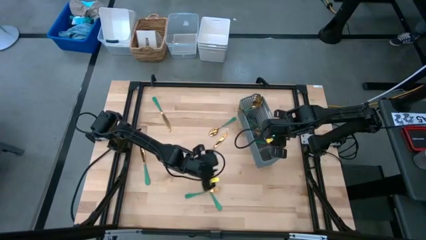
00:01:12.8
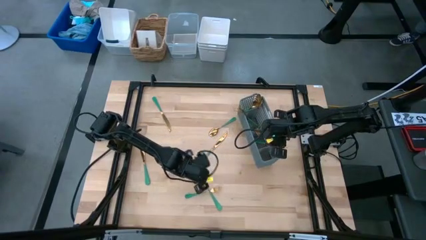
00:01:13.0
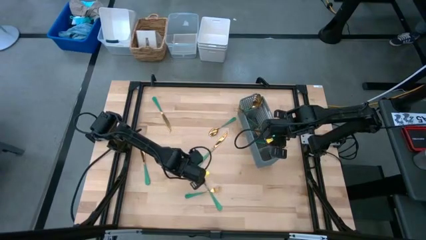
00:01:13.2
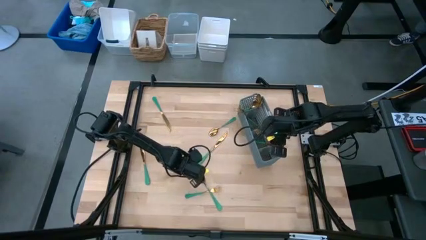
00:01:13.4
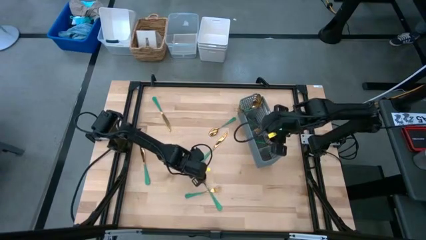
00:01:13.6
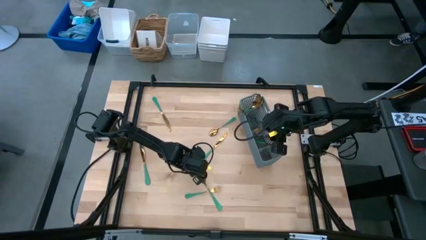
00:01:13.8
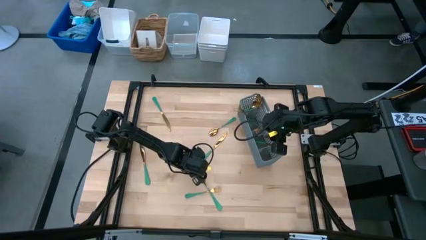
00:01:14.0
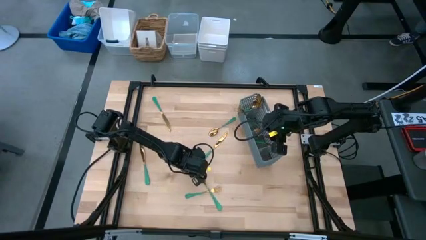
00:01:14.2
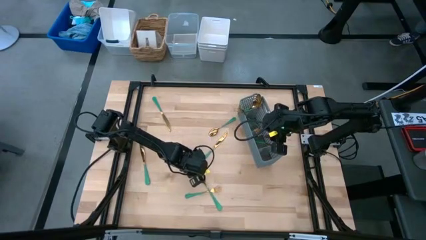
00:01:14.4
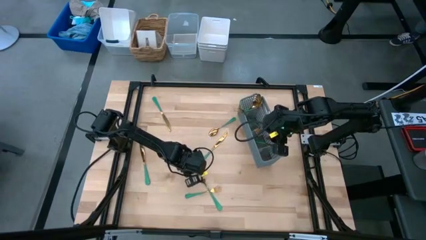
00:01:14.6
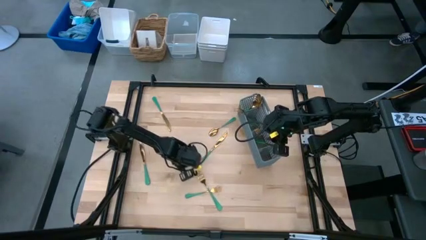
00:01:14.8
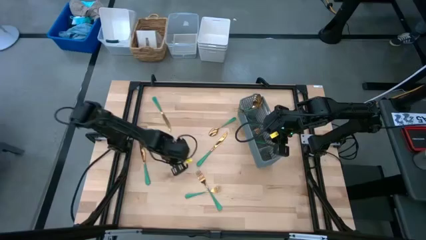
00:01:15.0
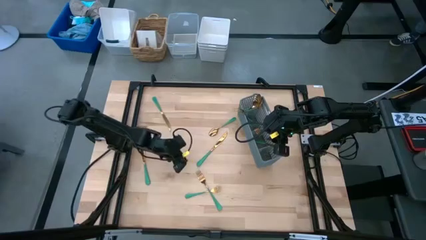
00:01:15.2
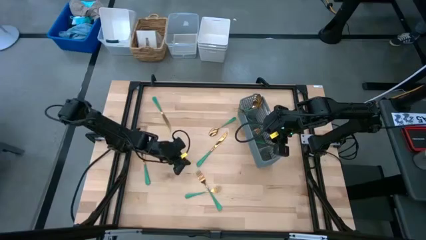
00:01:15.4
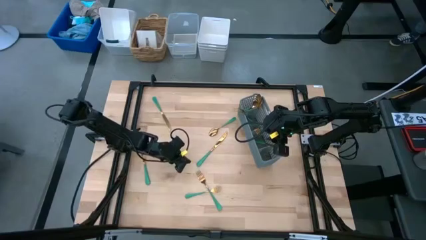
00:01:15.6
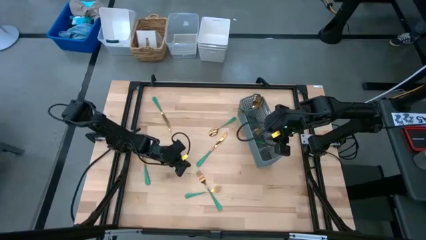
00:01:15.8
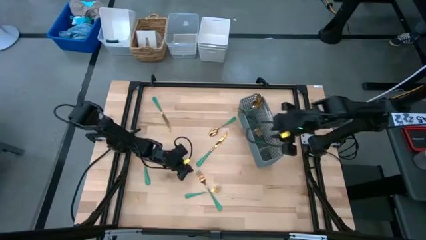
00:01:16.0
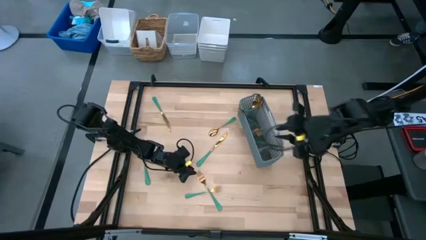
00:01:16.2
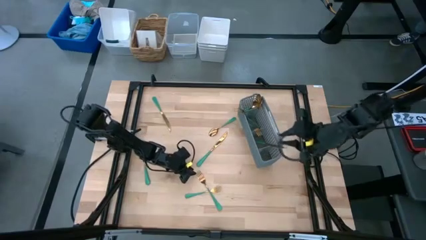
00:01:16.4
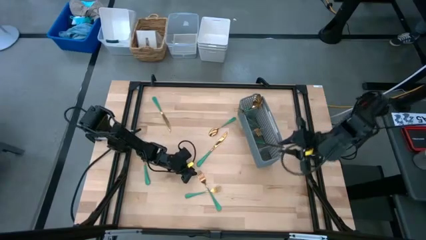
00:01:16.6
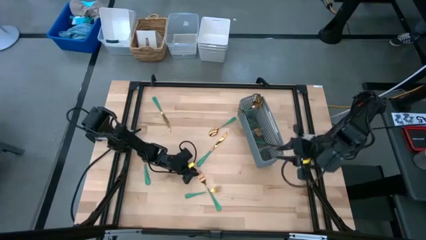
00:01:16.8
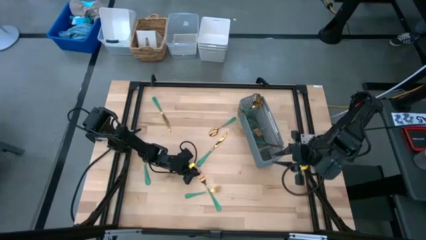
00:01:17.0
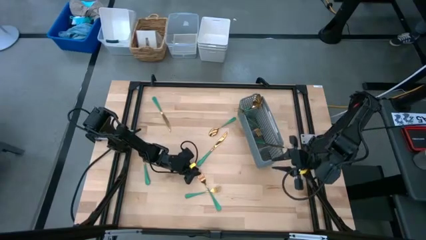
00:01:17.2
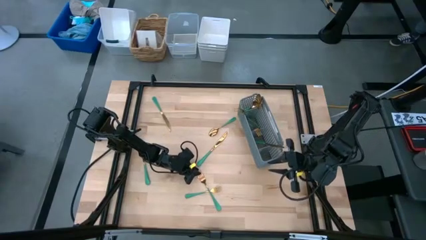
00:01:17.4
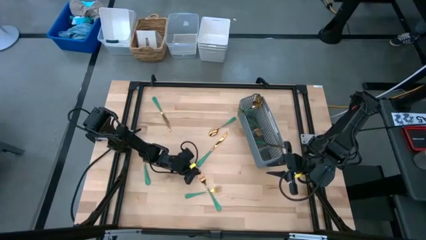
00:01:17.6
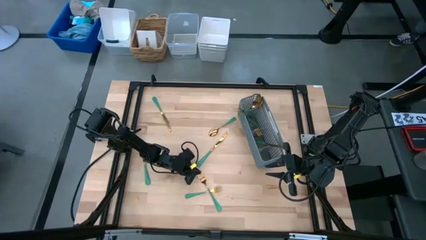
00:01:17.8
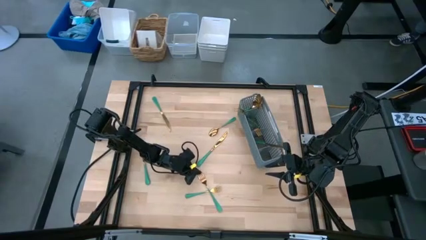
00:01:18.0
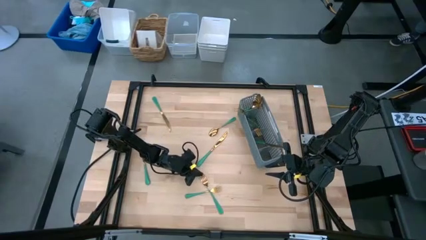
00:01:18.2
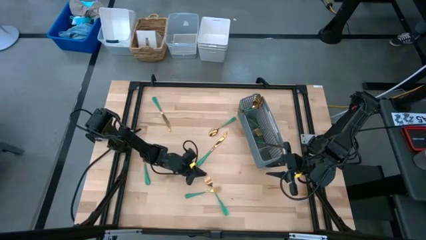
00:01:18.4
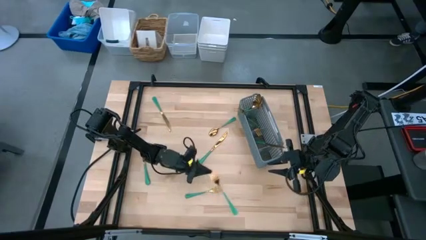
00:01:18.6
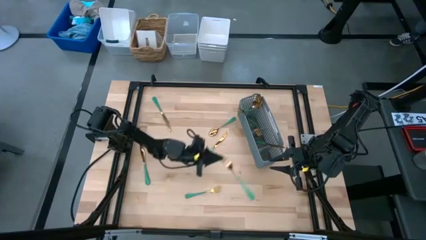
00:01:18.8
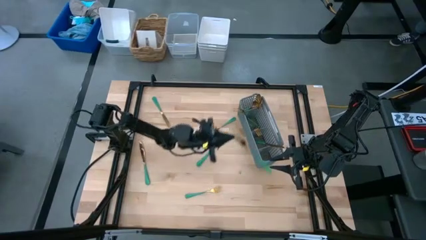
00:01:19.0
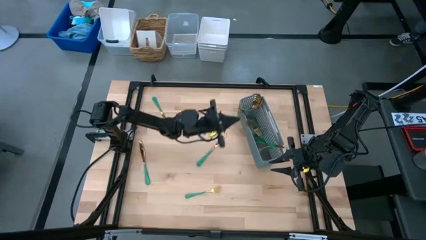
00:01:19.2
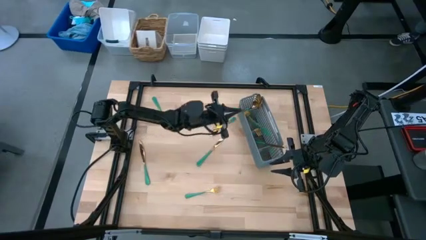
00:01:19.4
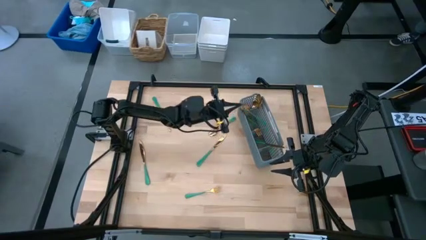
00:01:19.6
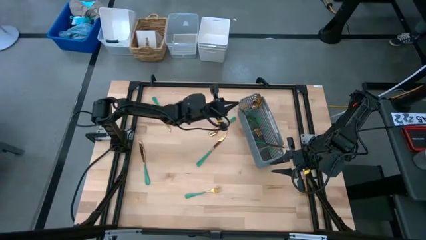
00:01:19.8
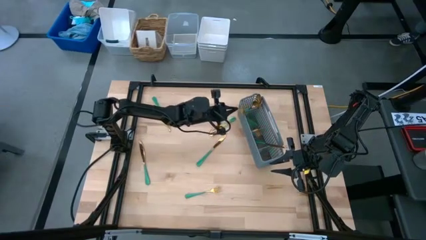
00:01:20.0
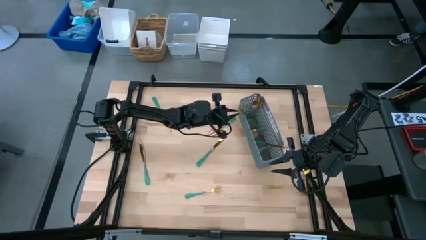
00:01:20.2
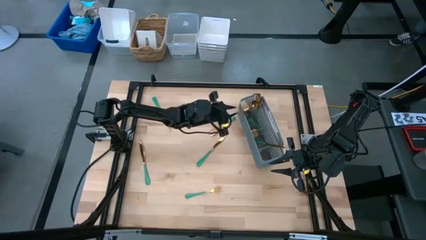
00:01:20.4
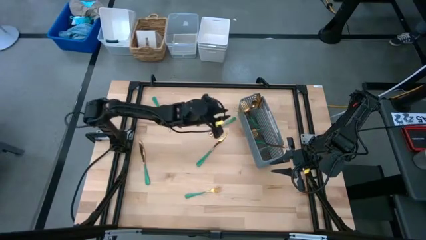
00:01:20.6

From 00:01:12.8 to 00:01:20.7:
Task: Sort silverware
Put the bottom fork in the middle section of the basket

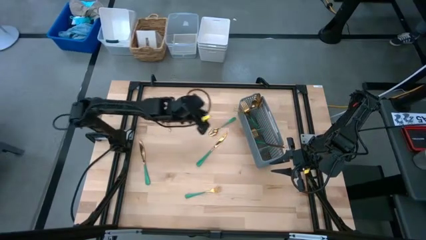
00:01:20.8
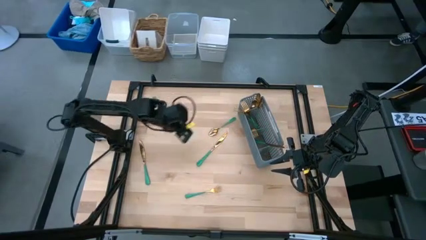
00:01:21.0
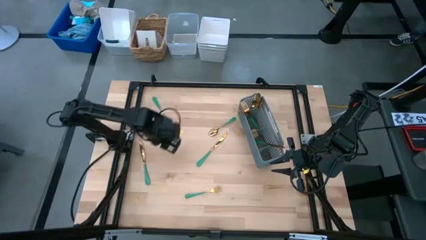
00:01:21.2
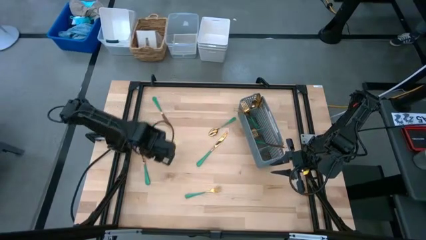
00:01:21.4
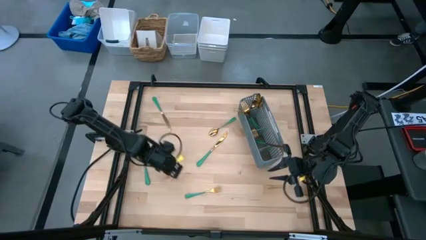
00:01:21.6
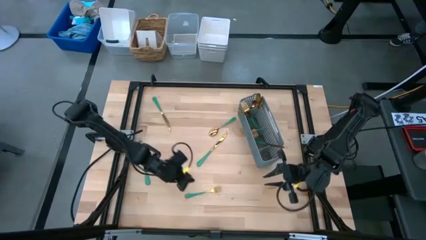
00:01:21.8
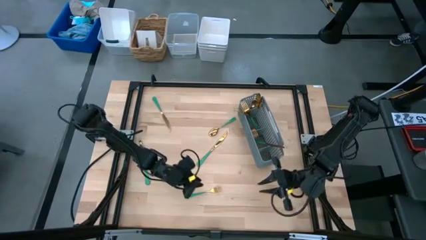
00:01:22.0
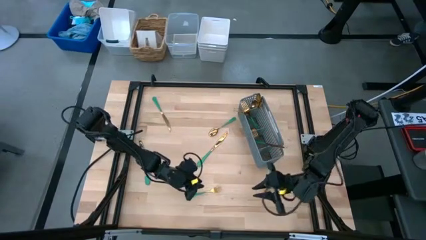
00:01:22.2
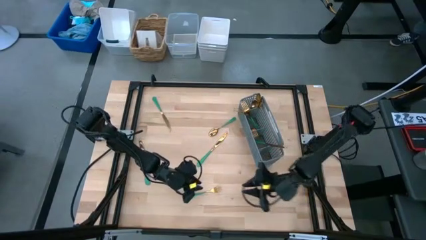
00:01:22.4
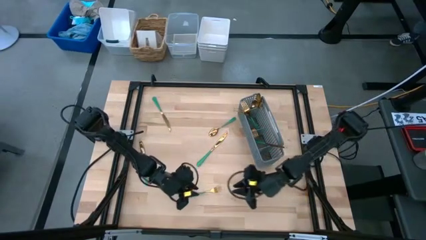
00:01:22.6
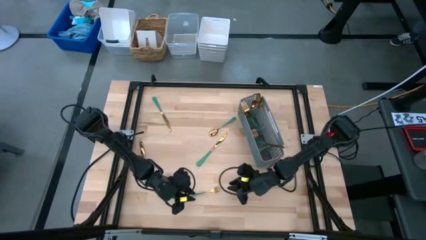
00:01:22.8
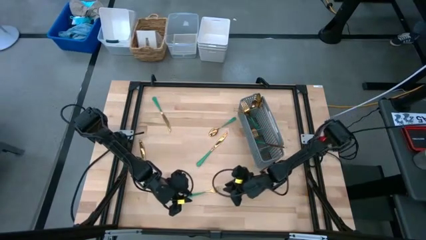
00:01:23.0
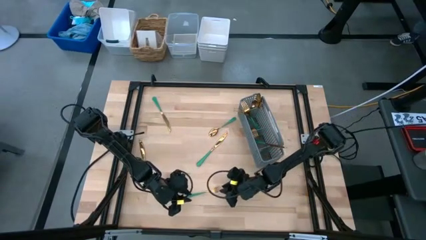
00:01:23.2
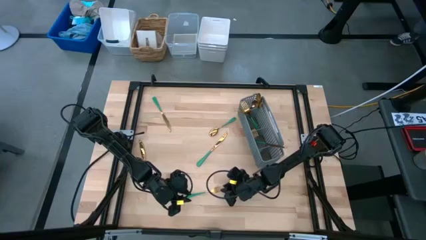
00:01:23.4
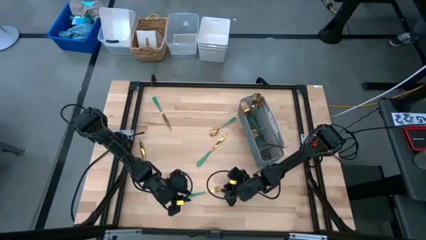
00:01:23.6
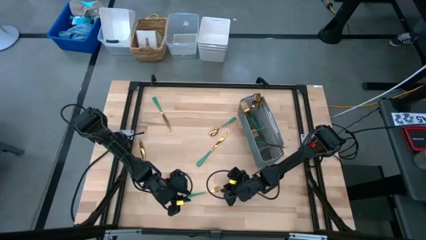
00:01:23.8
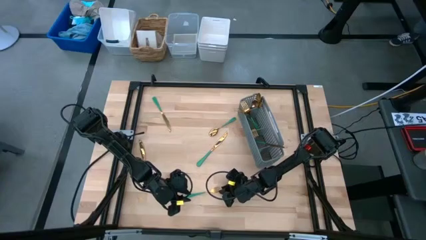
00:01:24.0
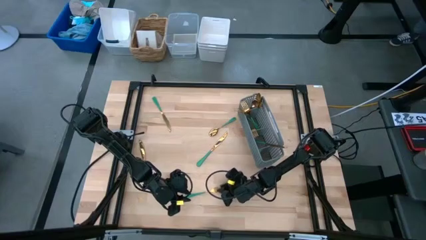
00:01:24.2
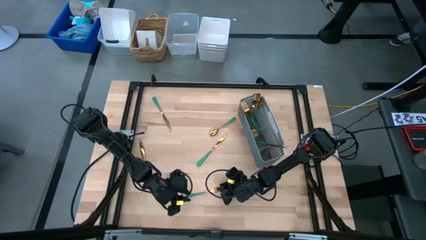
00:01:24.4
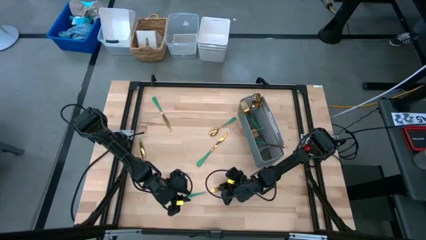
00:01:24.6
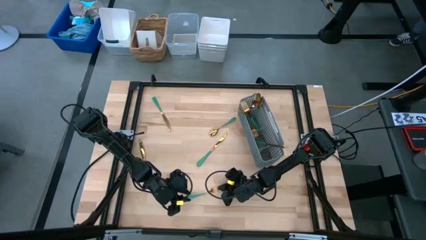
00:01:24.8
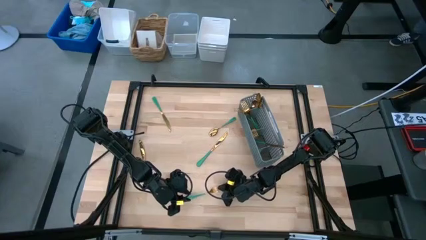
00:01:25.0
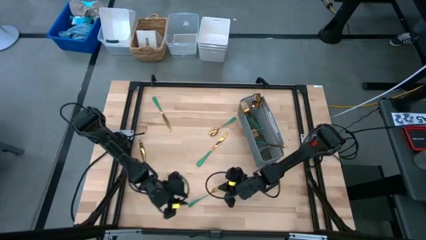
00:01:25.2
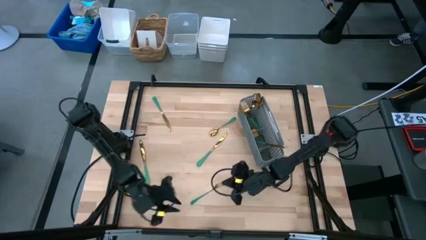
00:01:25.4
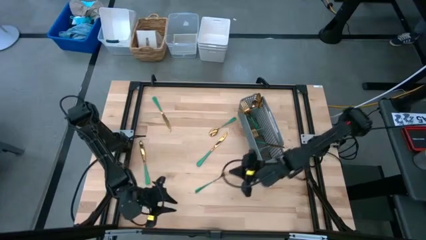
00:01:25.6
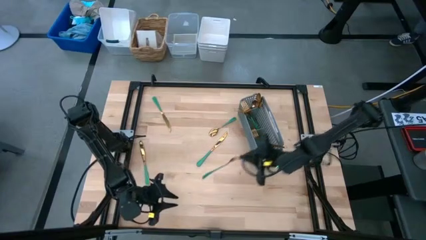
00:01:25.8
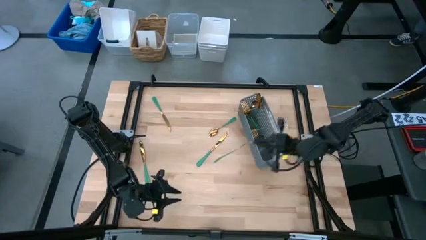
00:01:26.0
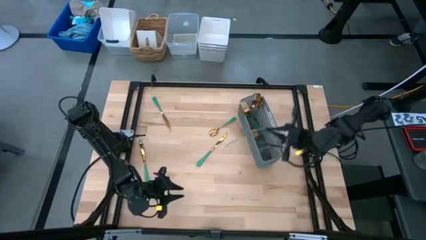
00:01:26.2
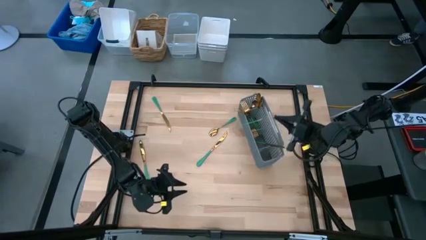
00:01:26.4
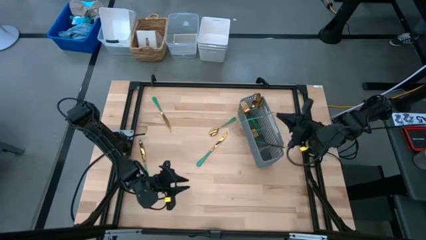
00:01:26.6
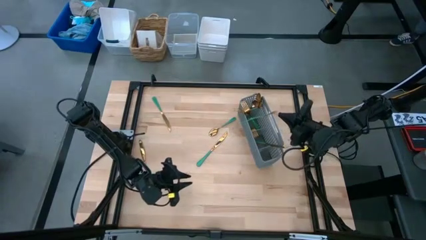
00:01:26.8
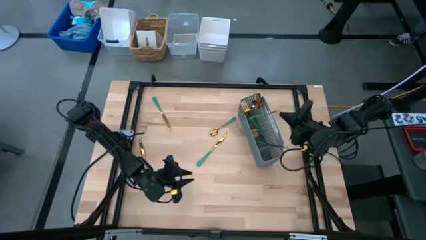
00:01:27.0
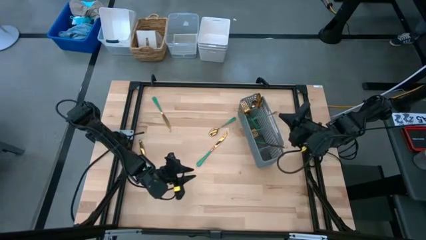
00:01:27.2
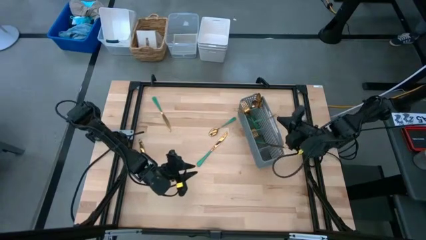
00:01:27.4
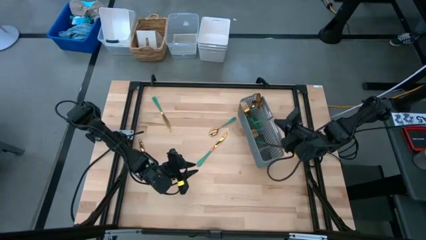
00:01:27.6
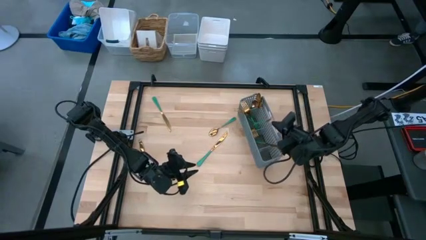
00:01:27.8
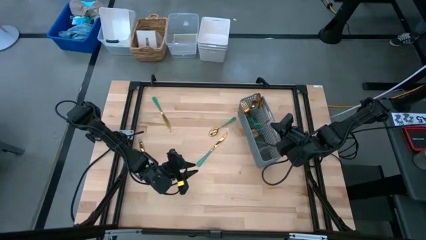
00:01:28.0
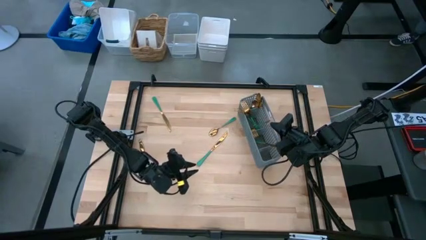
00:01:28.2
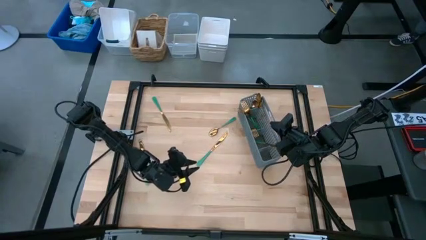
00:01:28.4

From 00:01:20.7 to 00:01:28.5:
Put the bottom fork in the middle section of the basket
